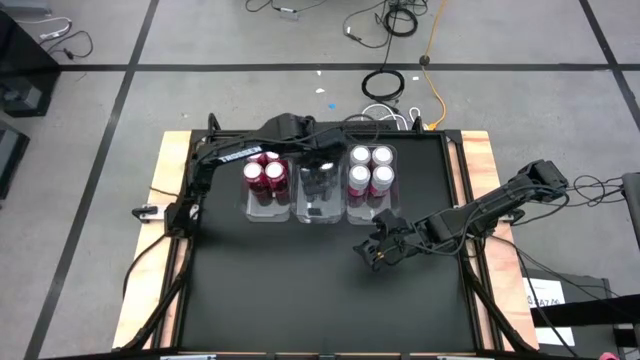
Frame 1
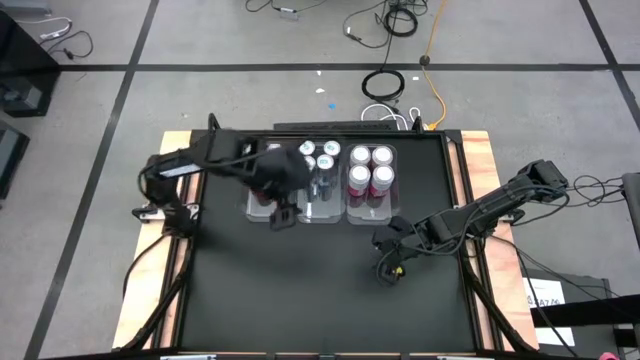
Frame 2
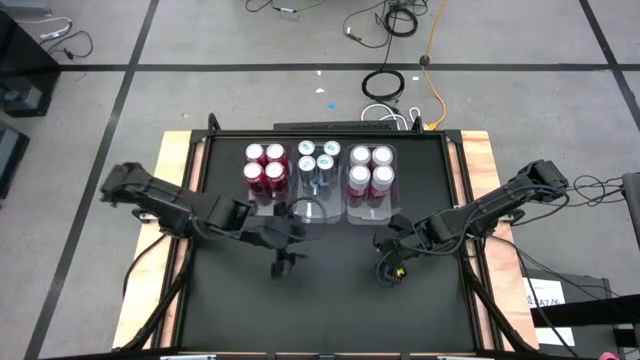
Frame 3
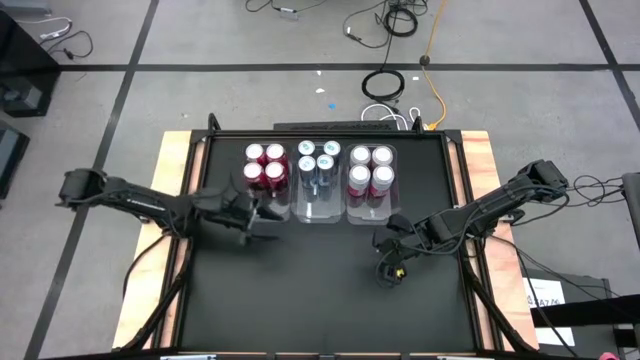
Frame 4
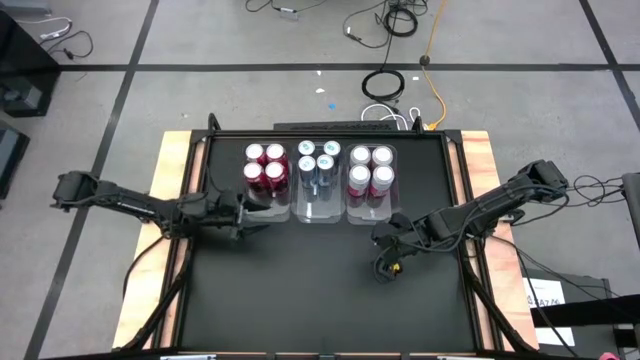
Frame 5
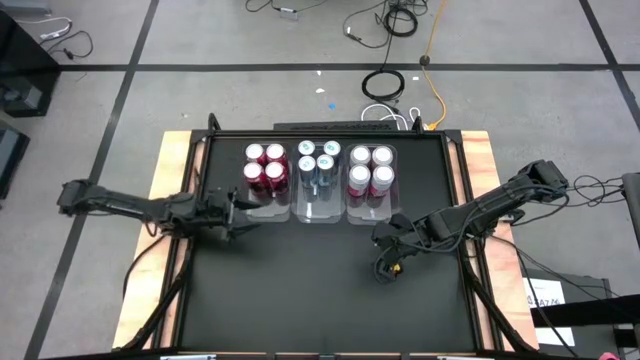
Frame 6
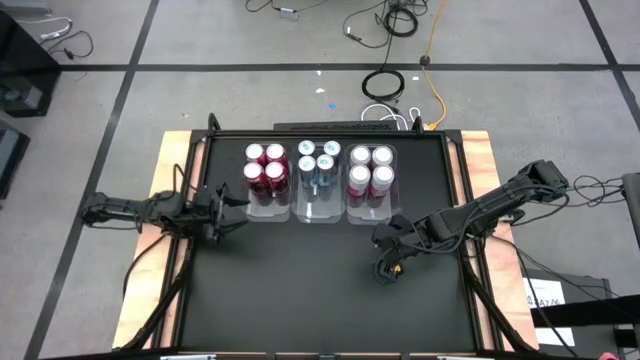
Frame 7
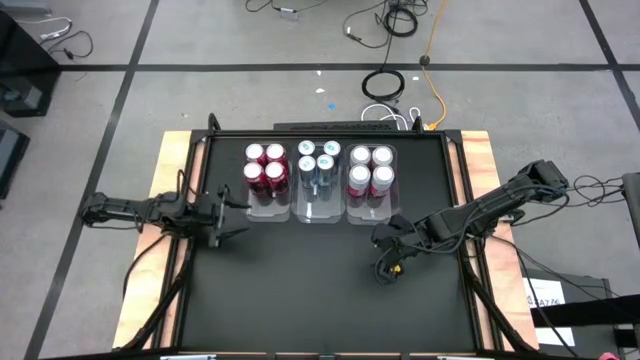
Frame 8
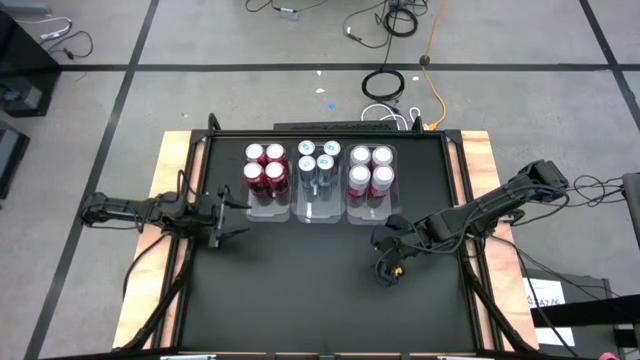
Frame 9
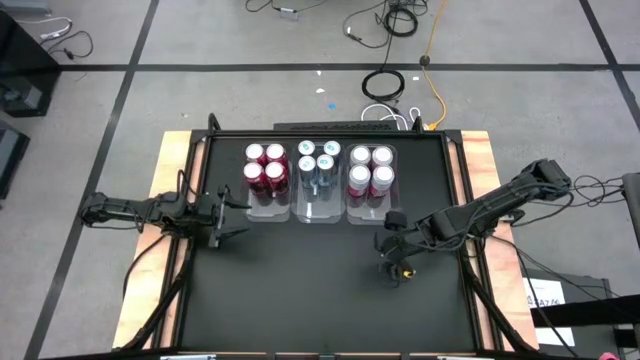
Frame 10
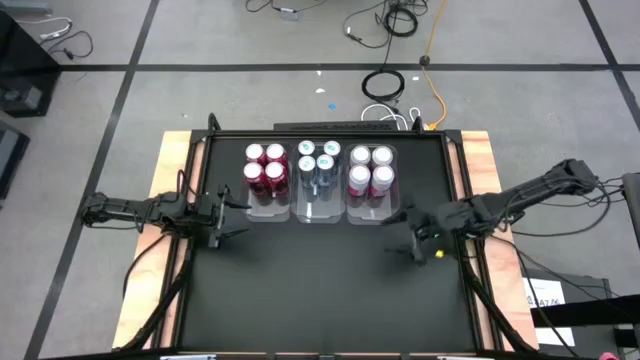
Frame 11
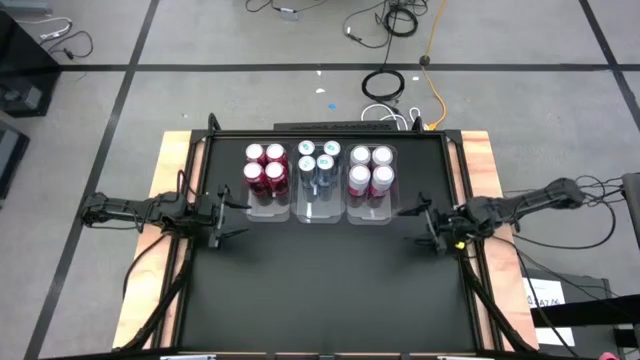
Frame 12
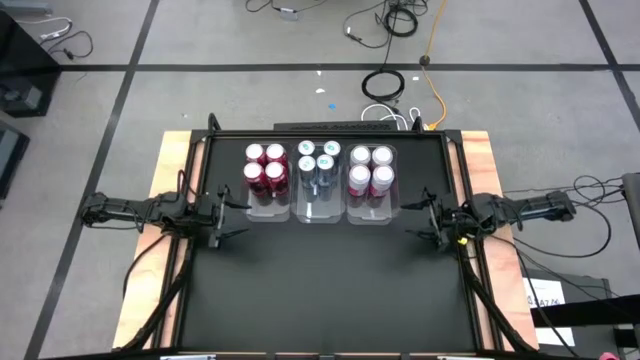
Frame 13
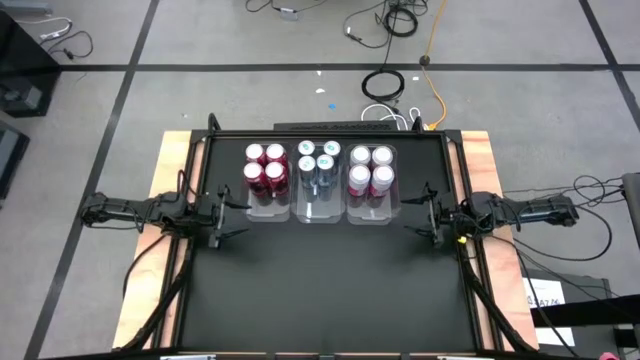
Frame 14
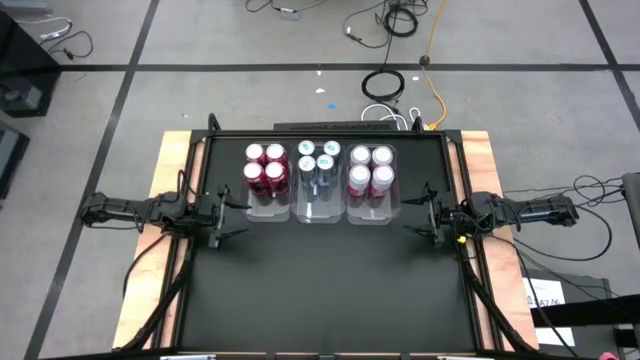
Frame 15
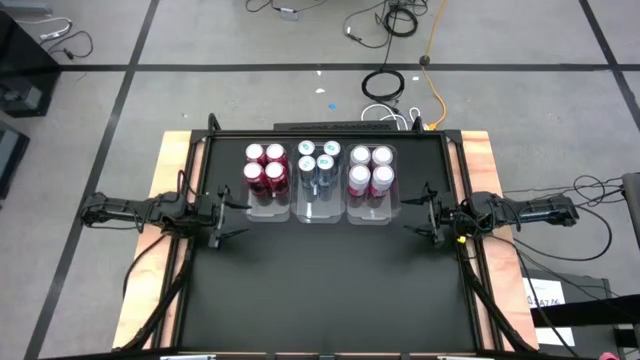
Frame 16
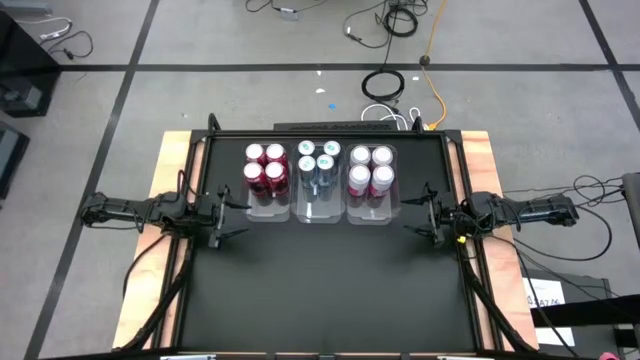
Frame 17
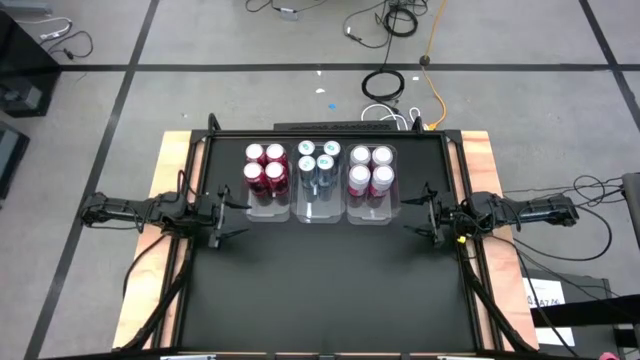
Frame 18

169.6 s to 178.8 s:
Task: Sort soda cans
Return to Home Position

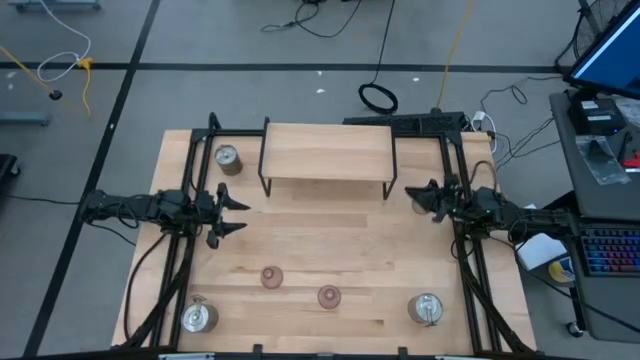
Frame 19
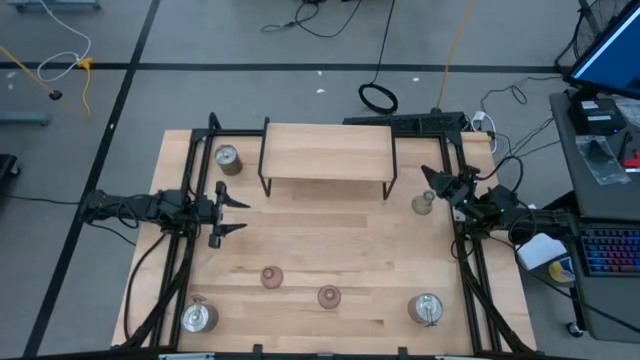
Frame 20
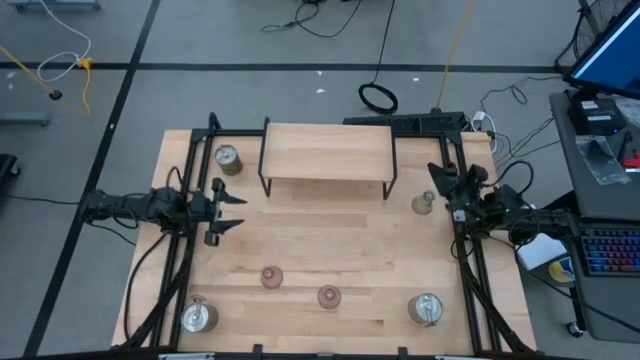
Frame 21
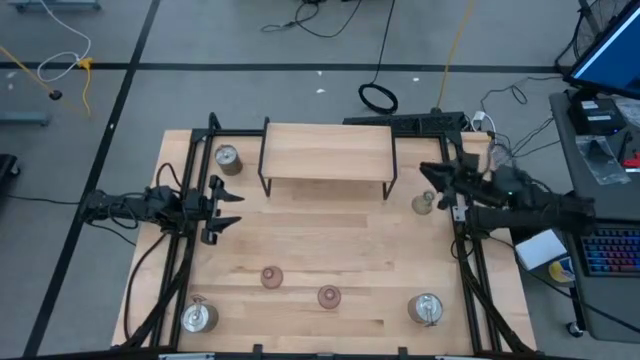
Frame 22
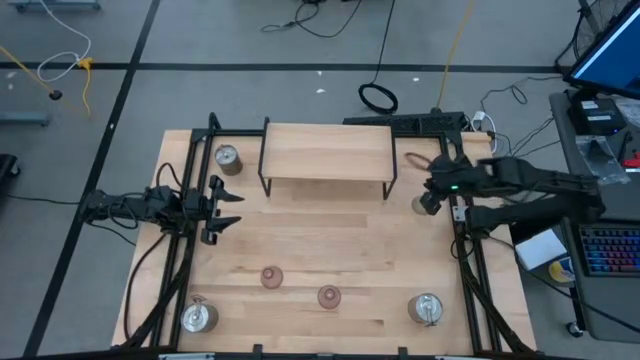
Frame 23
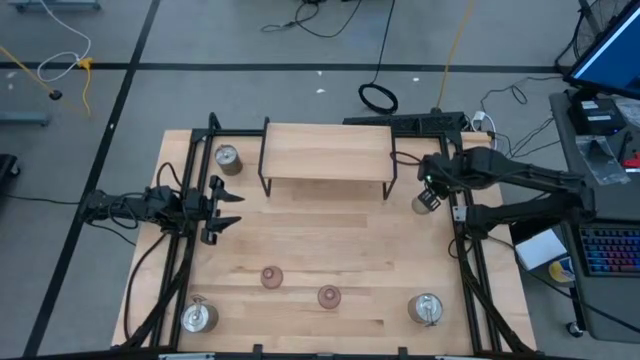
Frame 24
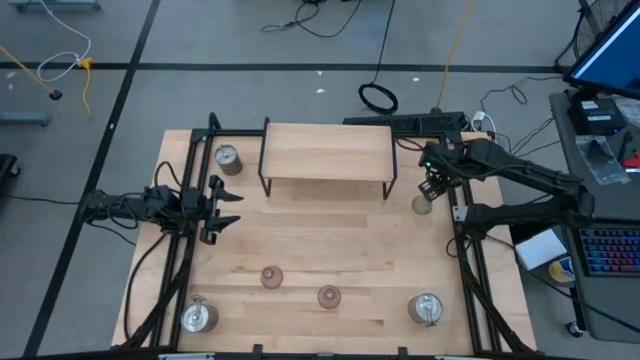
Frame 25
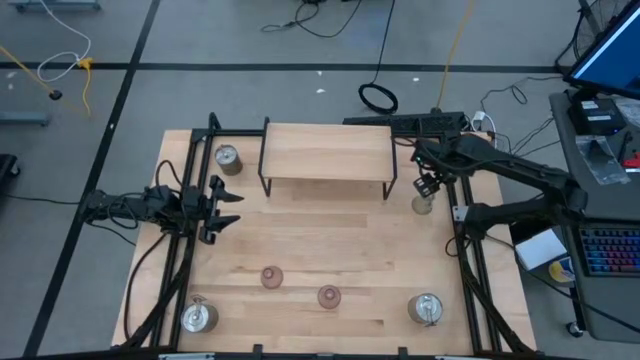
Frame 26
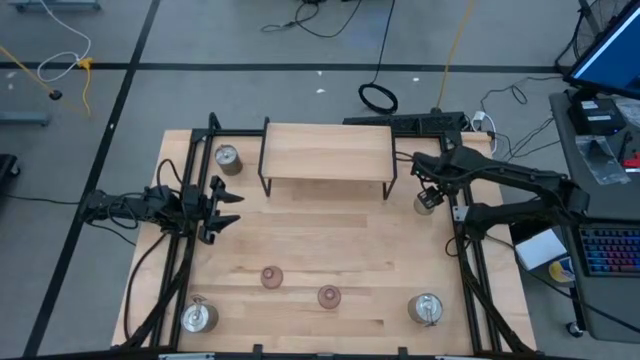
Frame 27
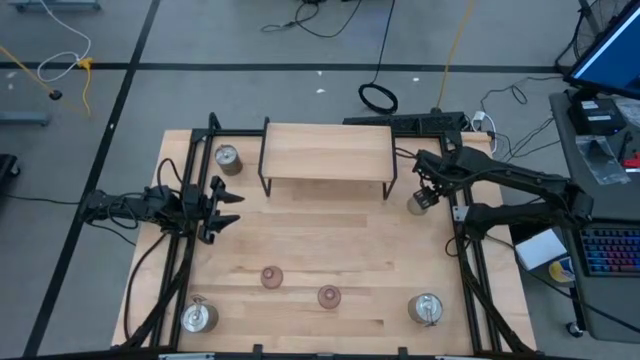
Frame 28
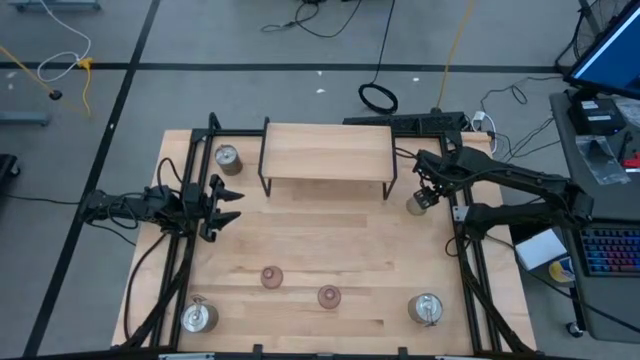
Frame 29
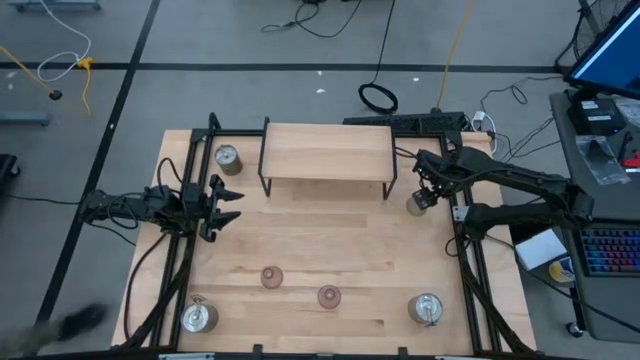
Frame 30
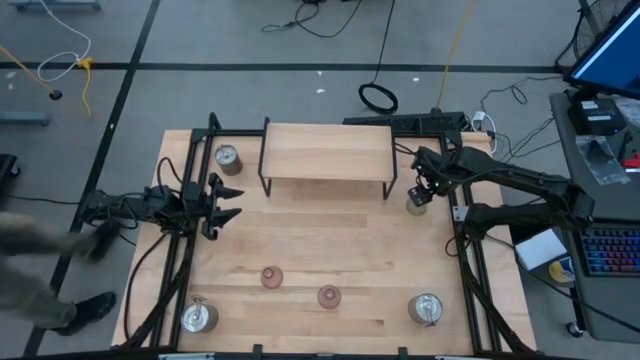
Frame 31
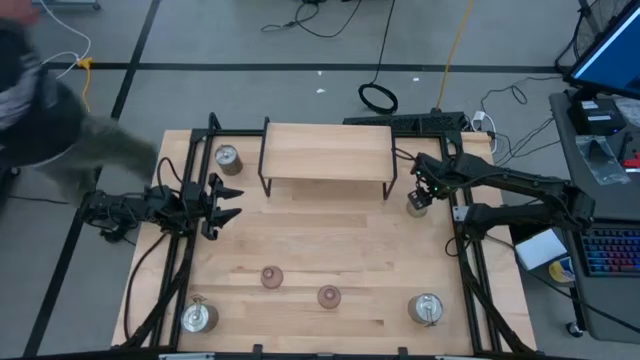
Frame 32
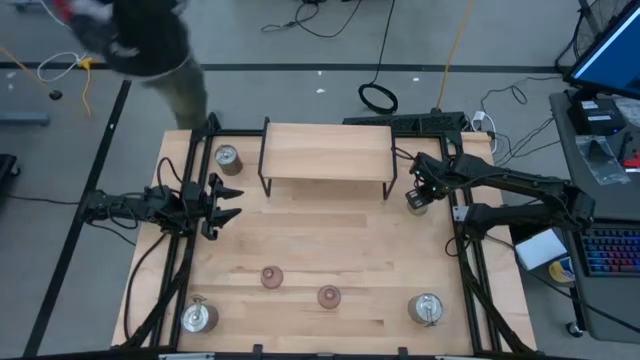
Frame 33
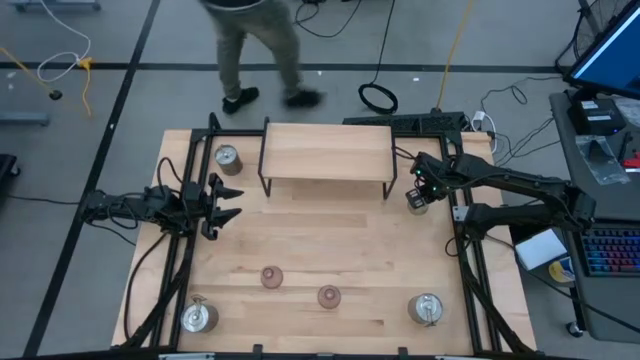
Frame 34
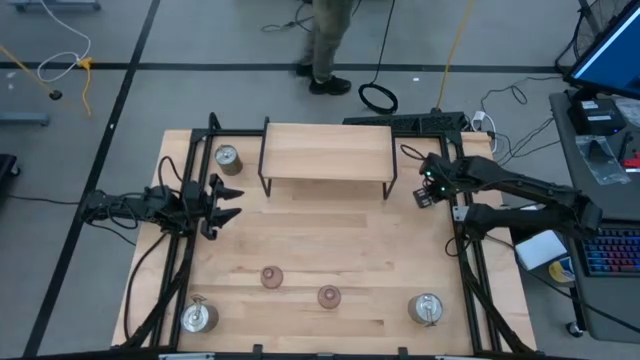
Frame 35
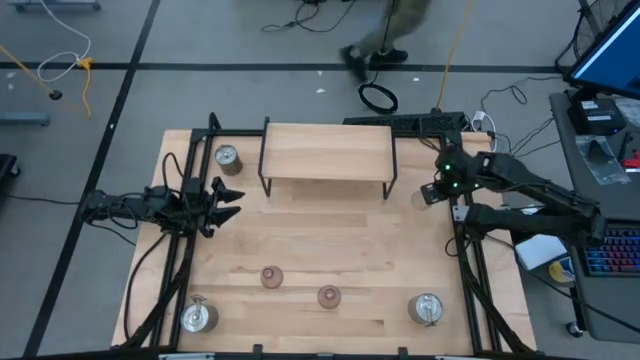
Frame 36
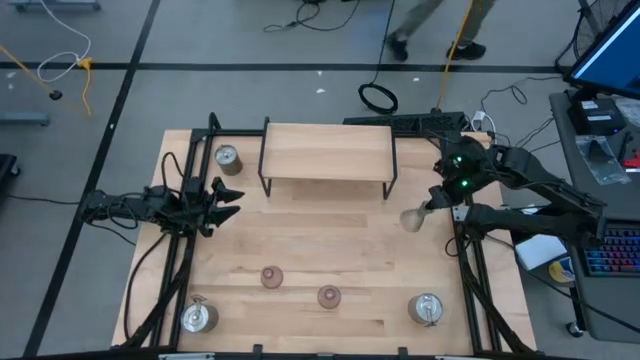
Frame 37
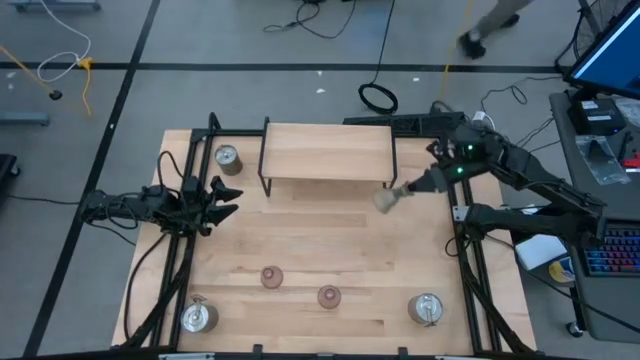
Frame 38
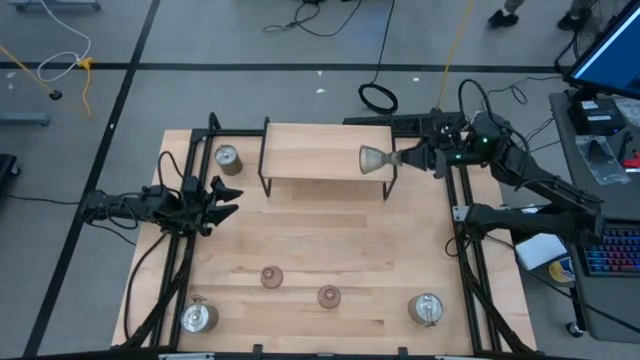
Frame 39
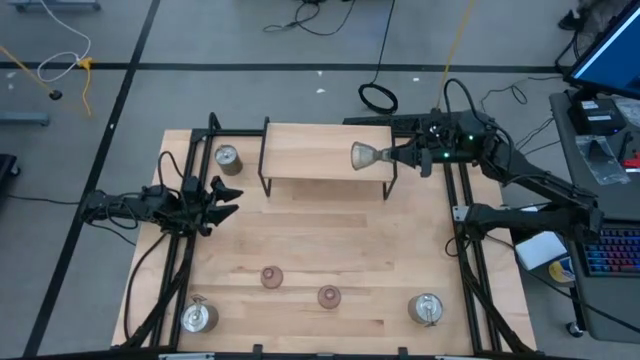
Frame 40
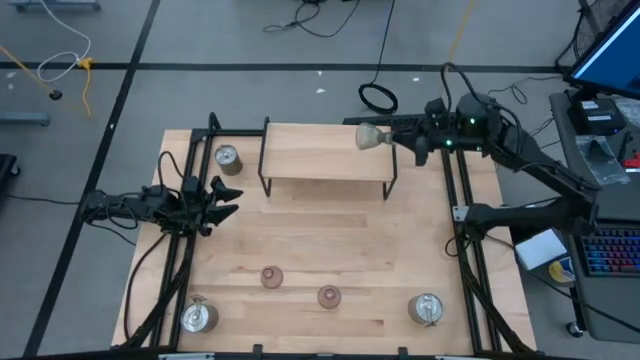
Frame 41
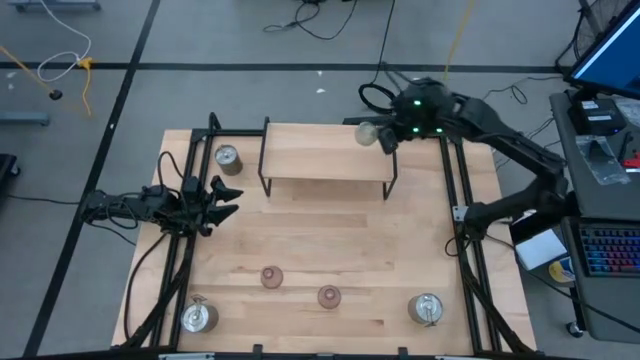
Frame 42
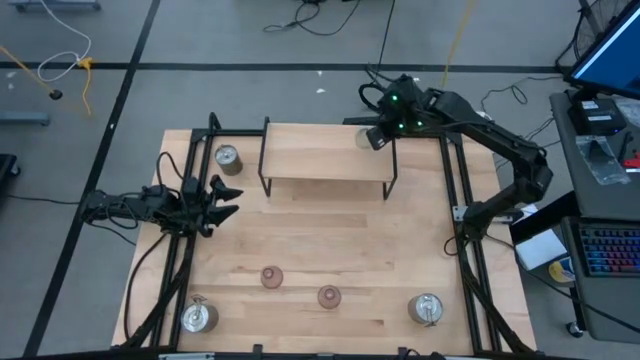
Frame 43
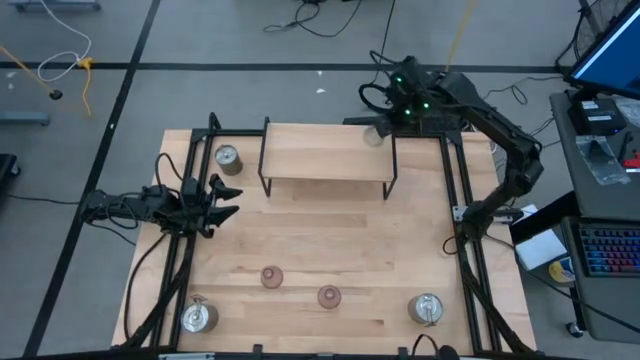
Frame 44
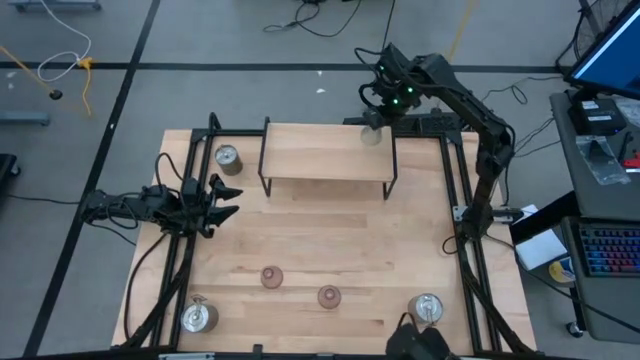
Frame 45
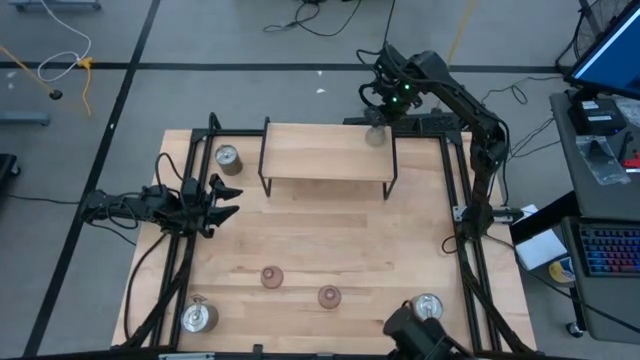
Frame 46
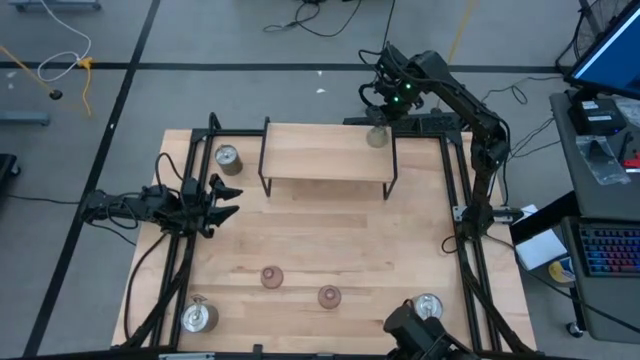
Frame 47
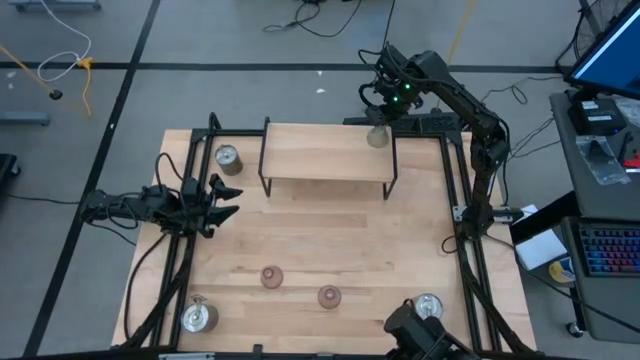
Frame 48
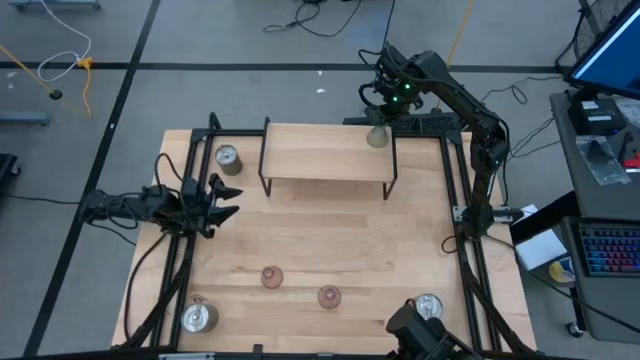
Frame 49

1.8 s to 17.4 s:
Task: Pick & Place candle stick holders
Put the transparent candle holder on the shelf
